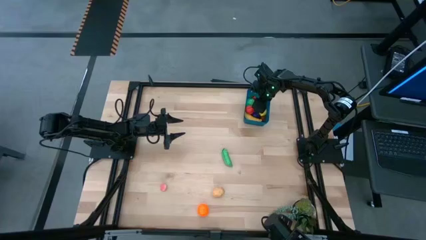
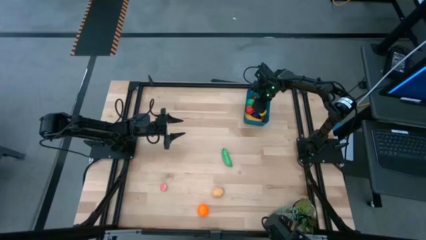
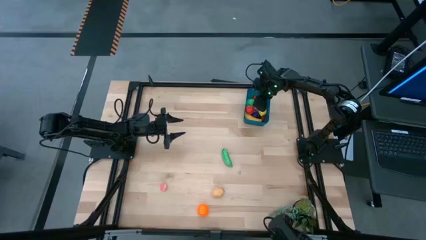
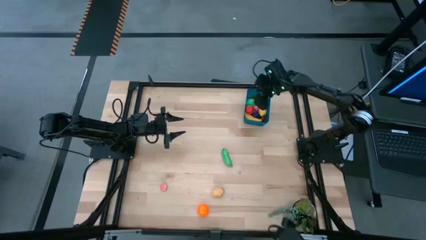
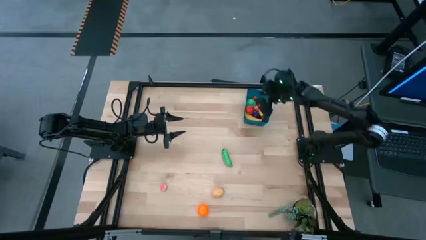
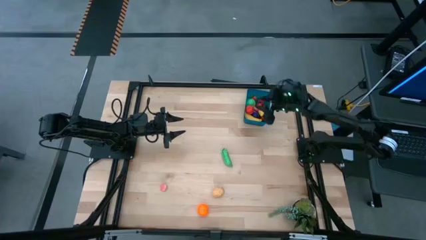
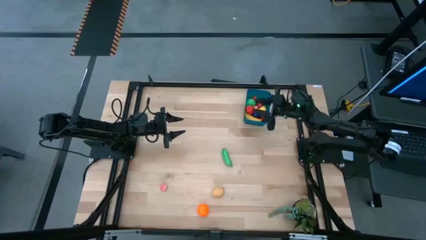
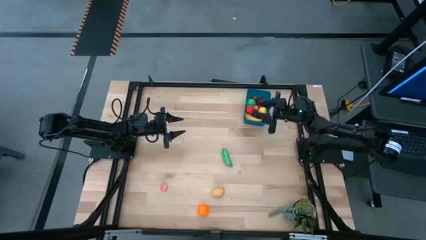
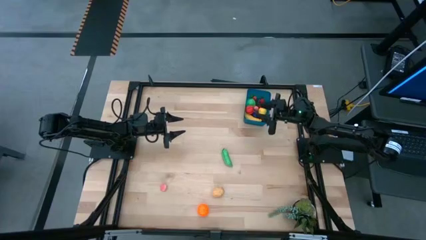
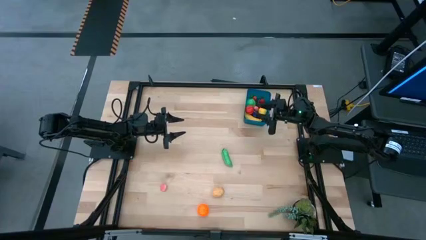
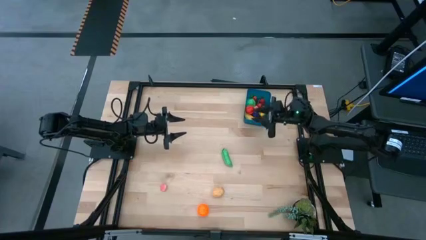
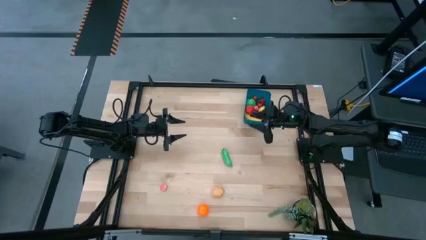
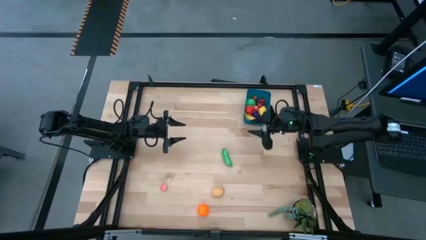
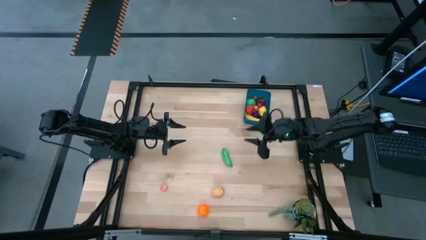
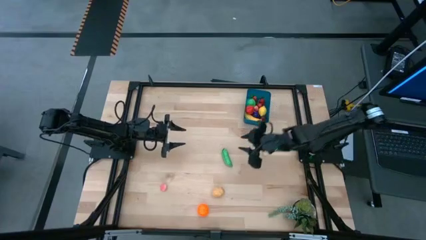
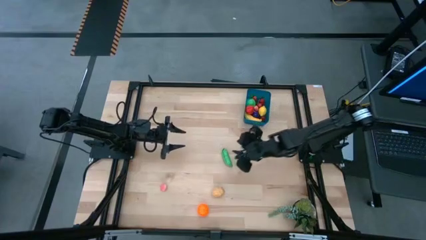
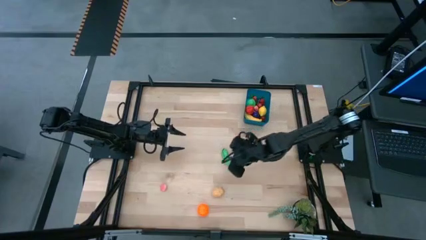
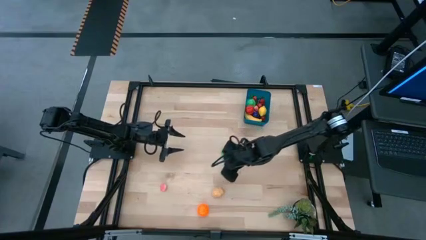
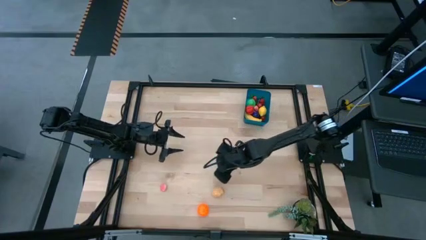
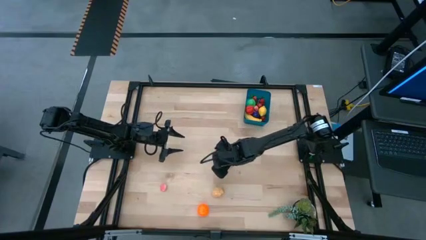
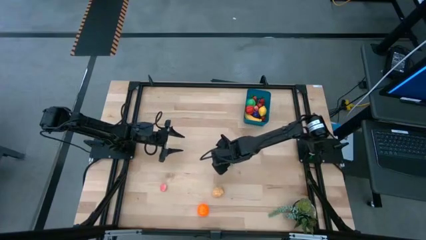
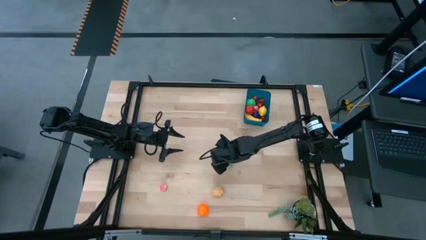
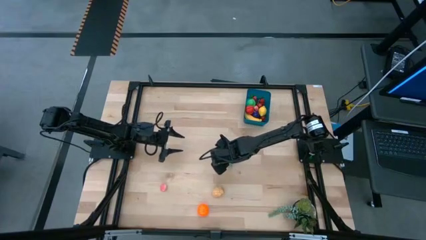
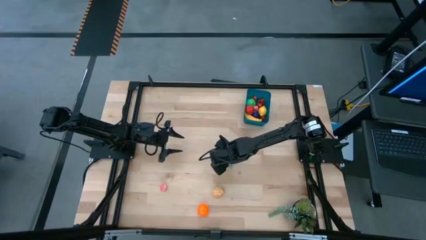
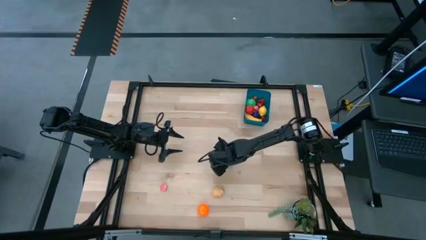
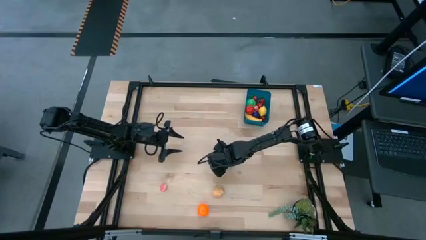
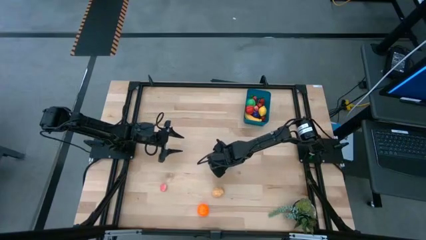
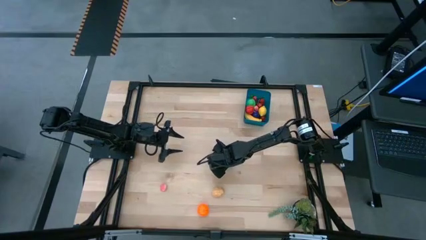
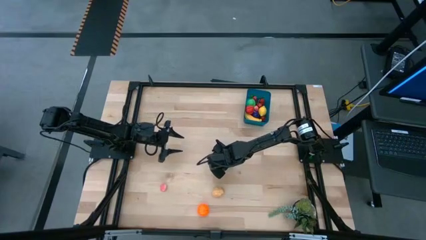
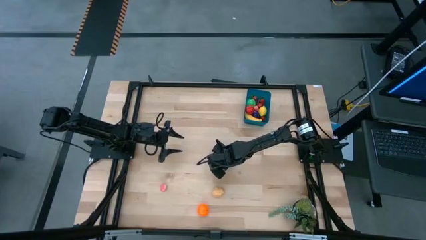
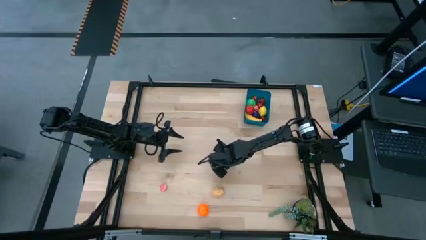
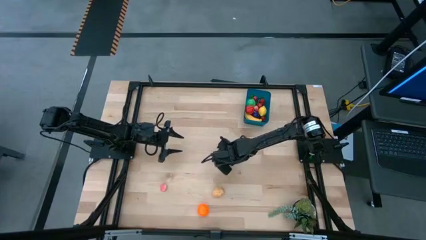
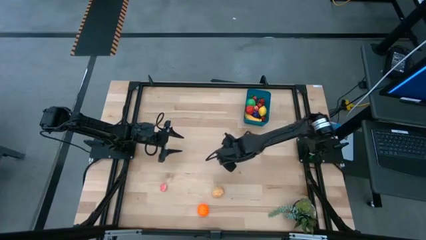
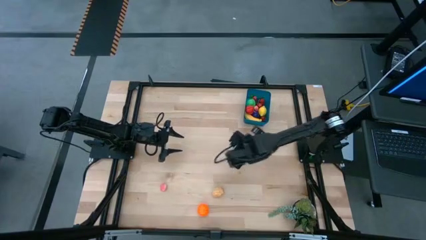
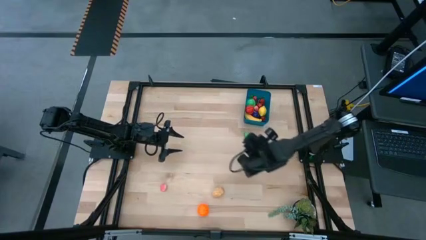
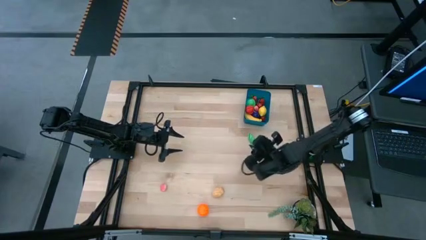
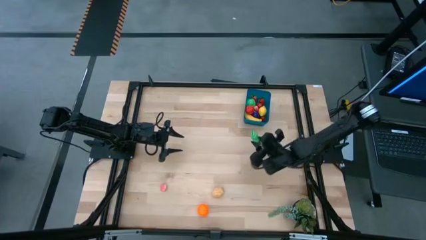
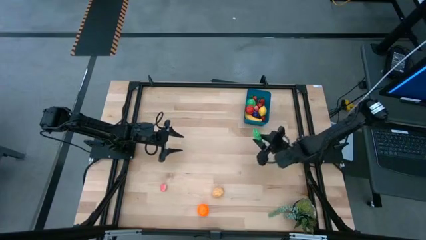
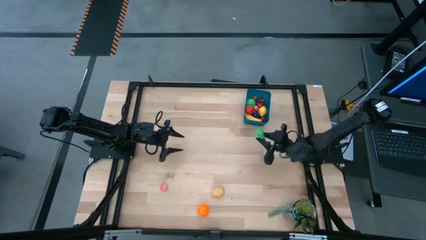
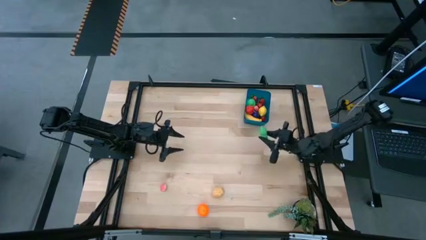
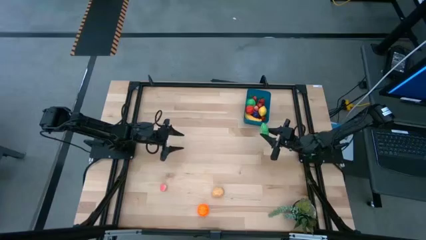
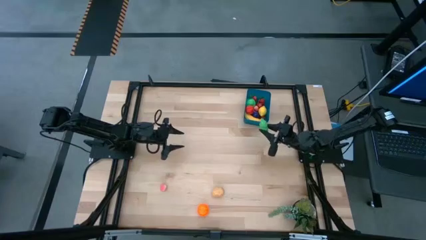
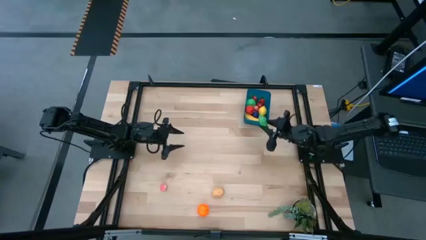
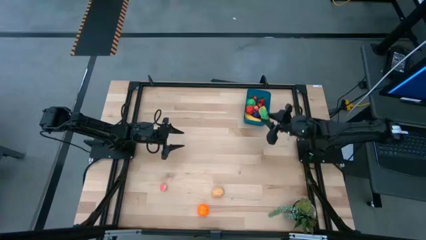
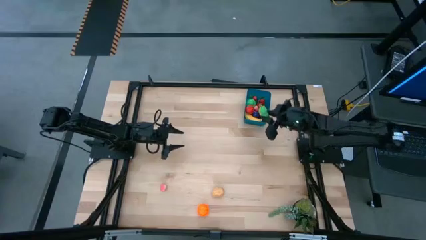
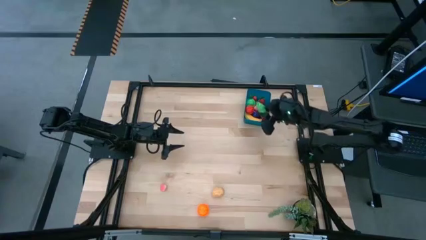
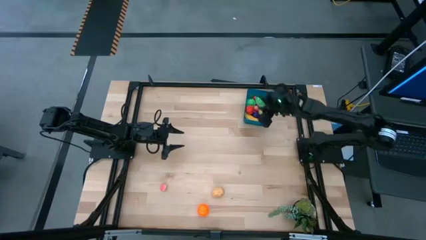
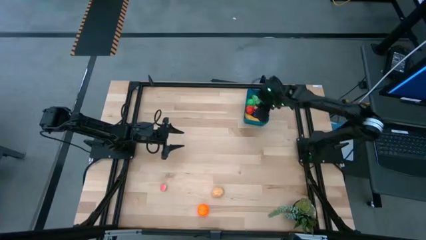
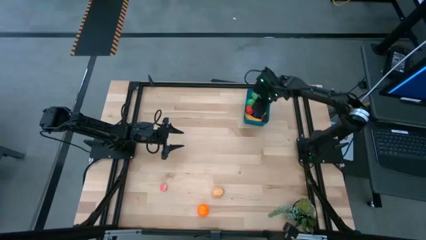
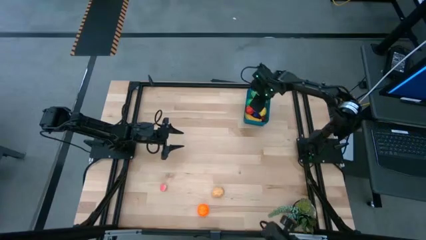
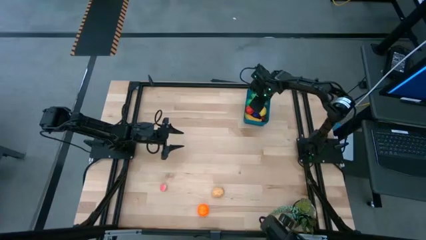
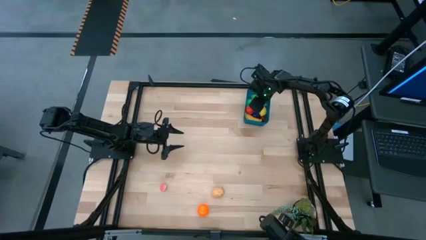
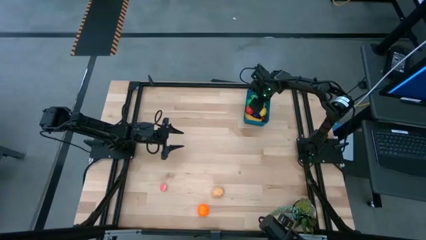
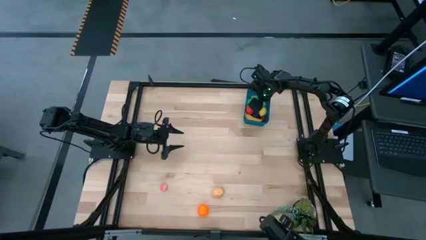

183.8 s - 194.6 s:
Task: Pick and placing Produce into tupperware
Put the green peas into the blue bin

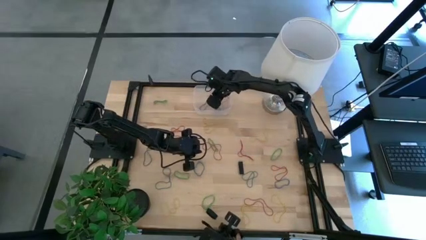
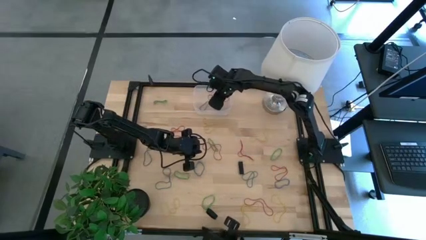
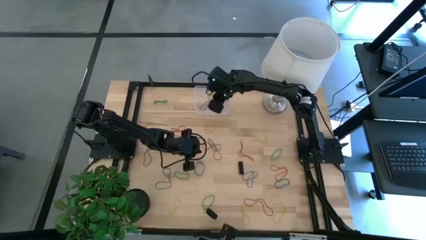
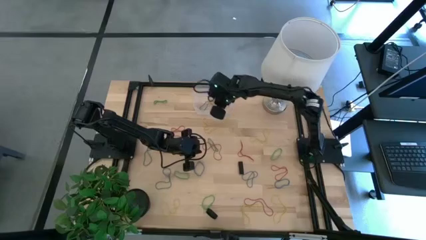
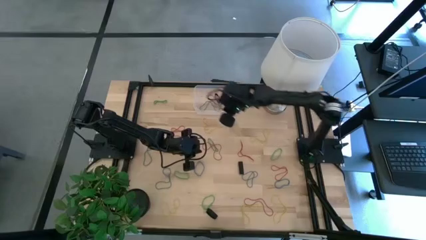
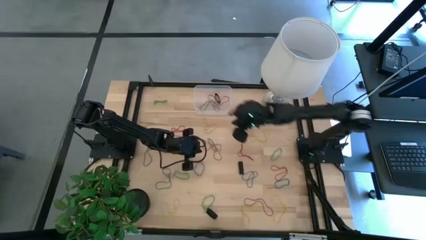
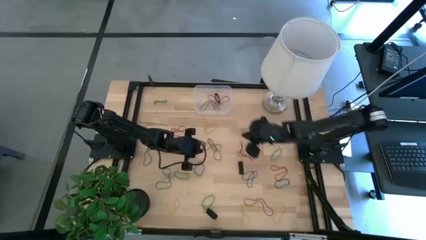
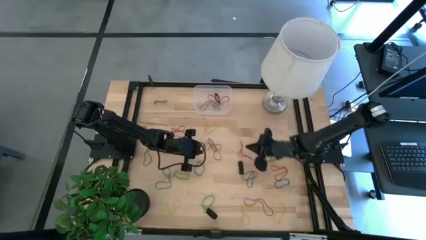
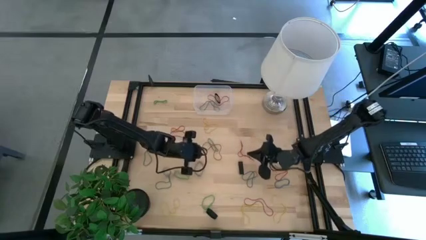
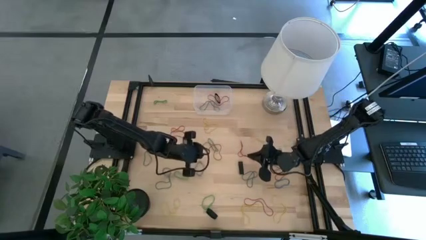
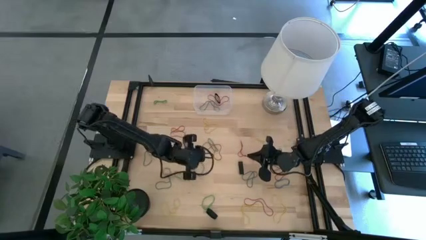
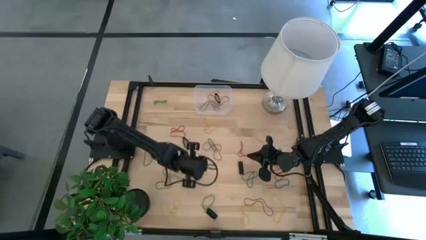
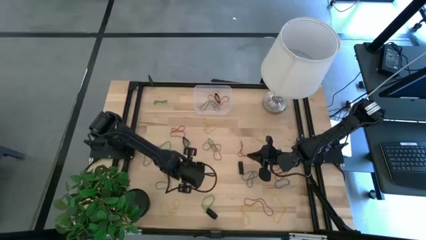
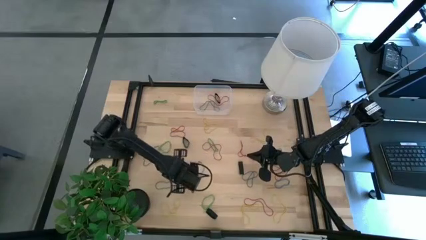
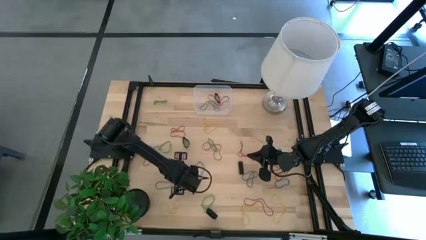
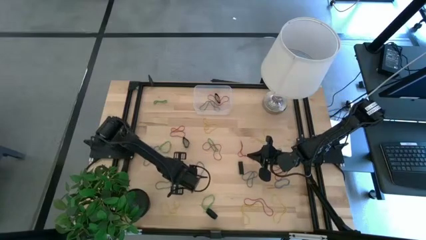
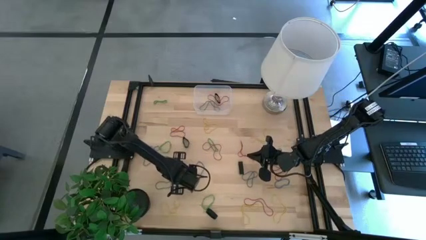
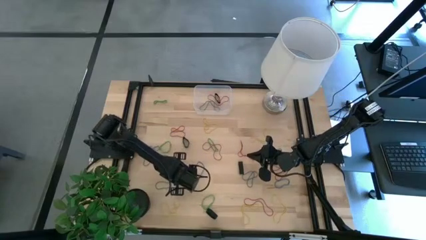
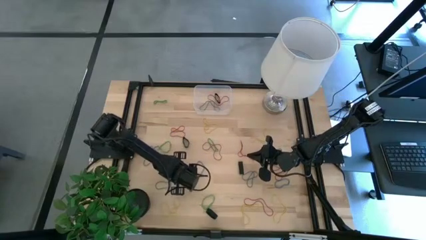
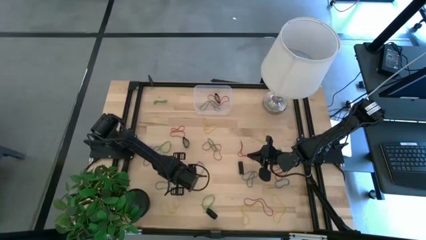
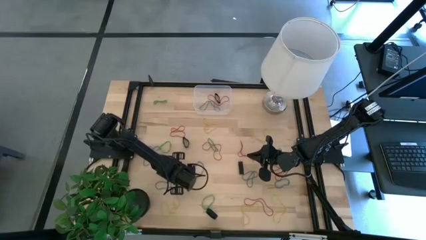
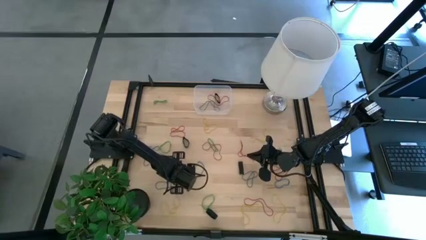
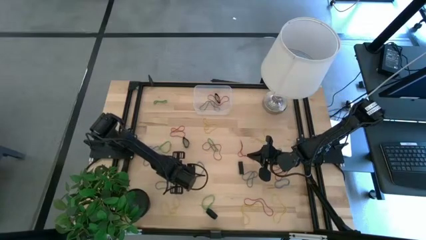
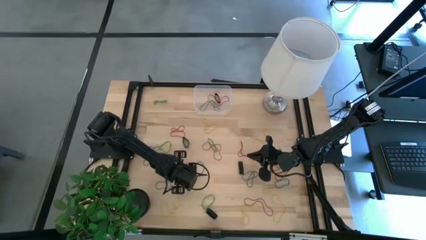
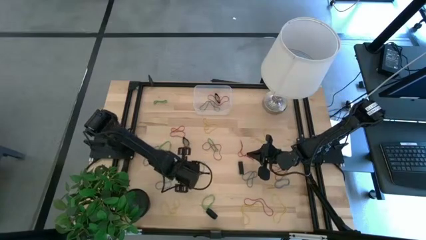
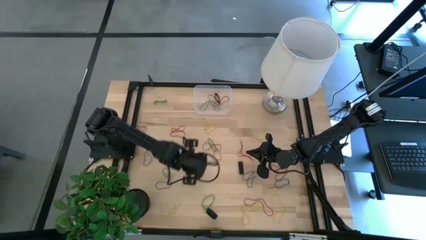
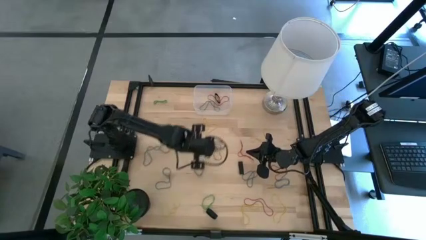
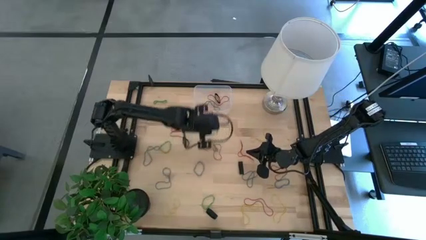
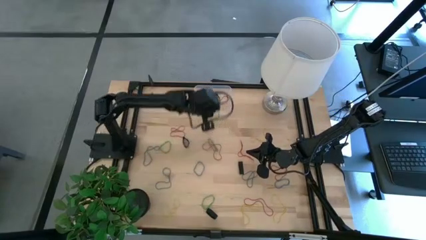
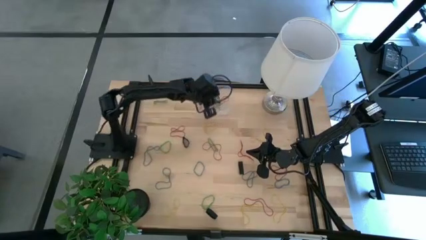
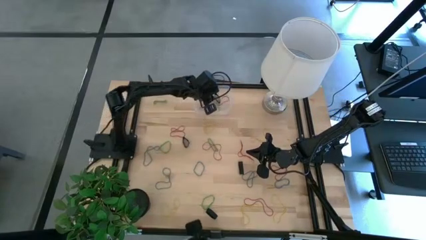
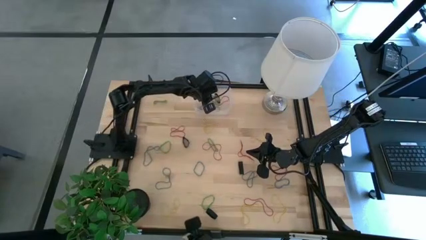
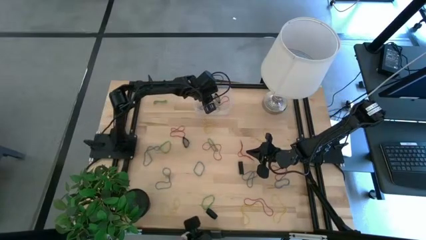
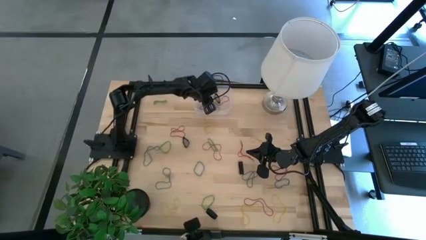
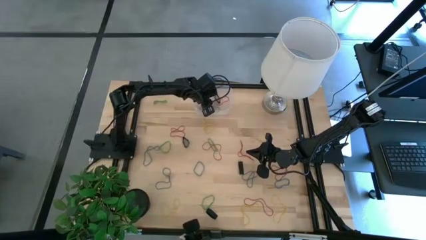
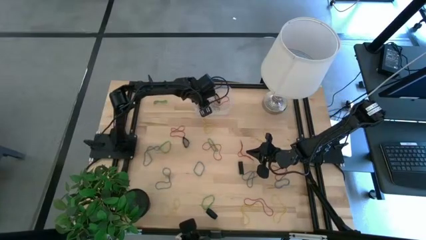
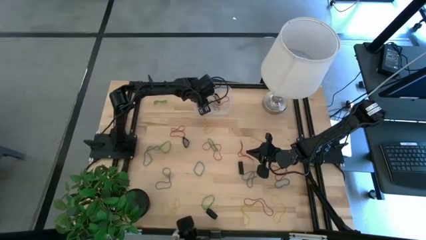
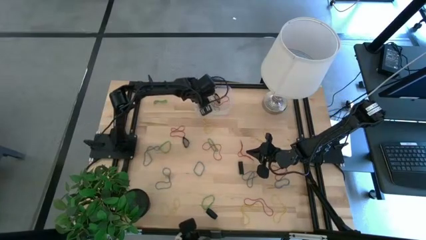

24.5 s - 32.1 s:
Task: Pick and place rubber bands into bin
Put the green rubber band into the transparent bin
